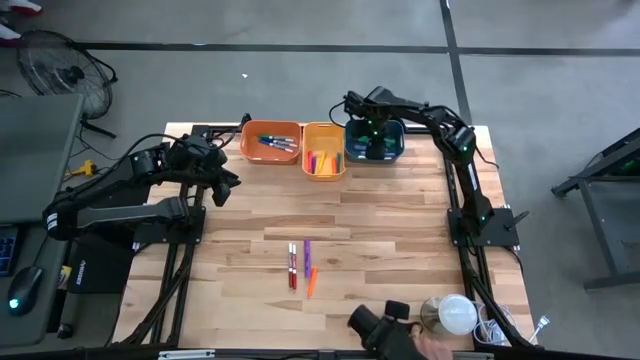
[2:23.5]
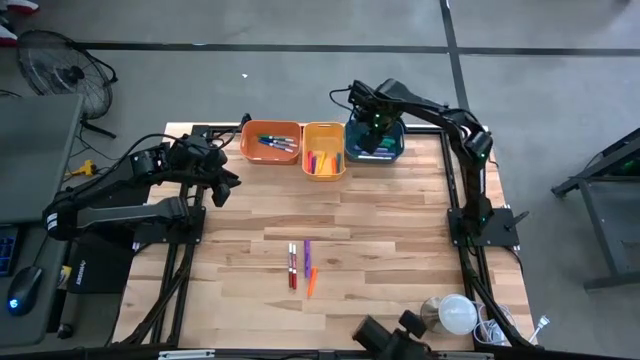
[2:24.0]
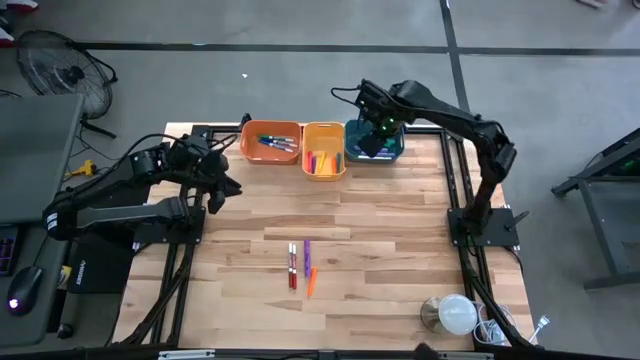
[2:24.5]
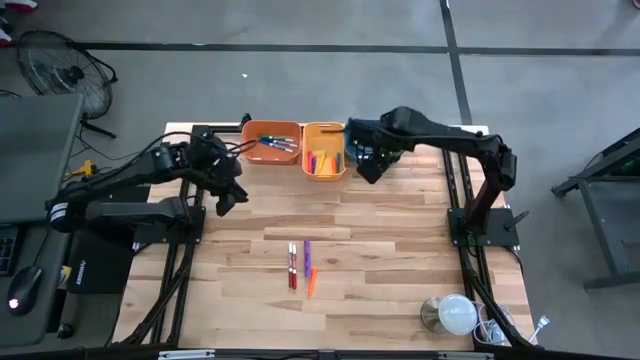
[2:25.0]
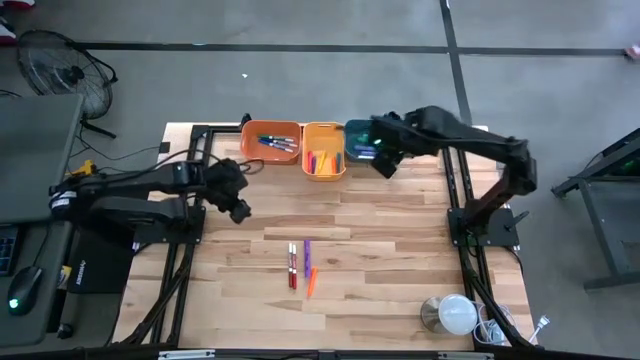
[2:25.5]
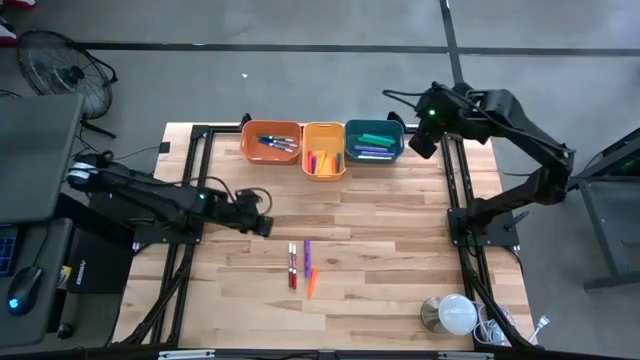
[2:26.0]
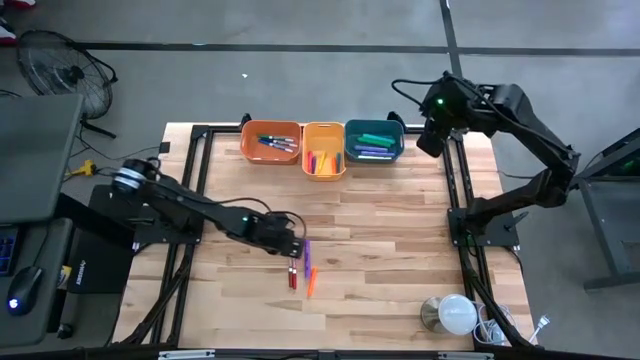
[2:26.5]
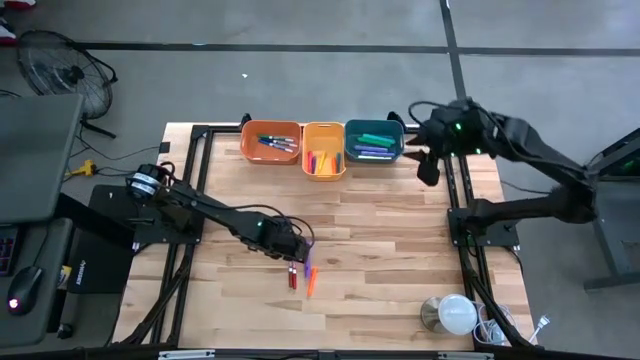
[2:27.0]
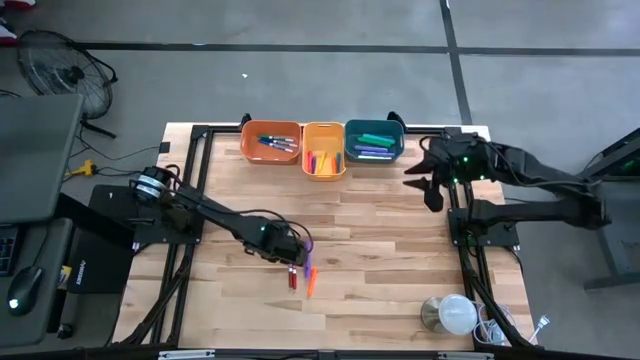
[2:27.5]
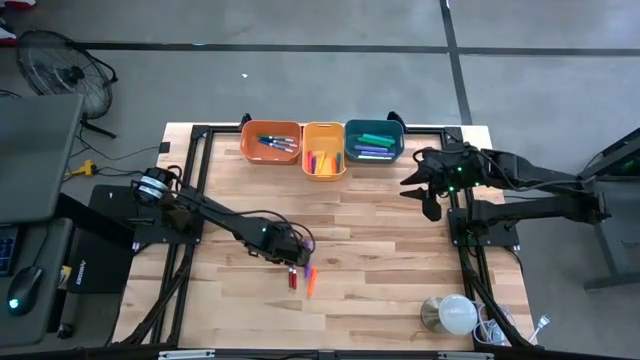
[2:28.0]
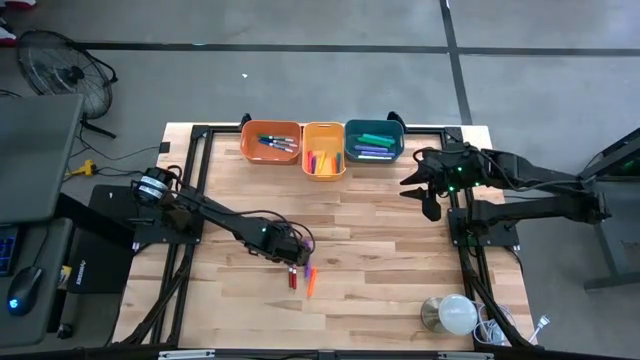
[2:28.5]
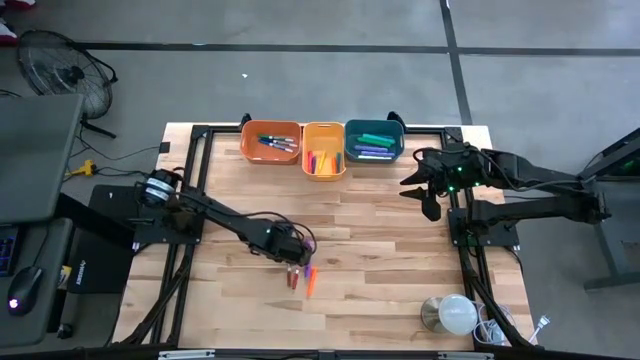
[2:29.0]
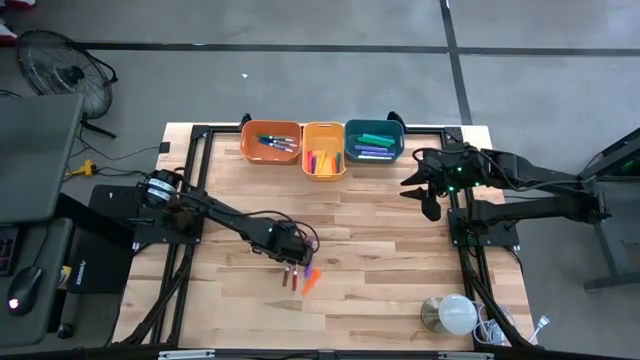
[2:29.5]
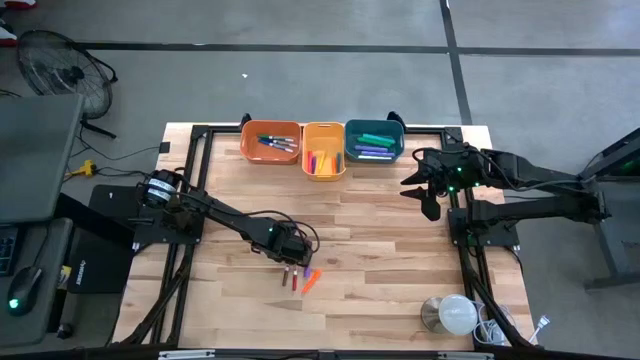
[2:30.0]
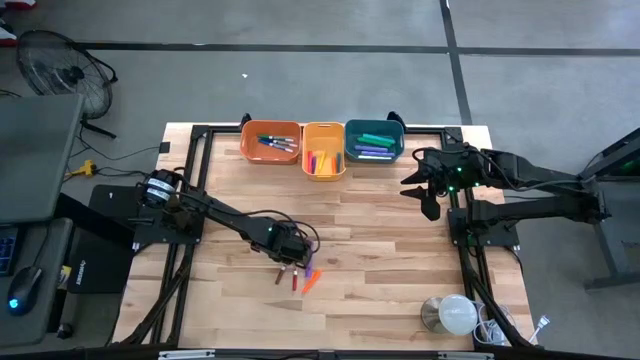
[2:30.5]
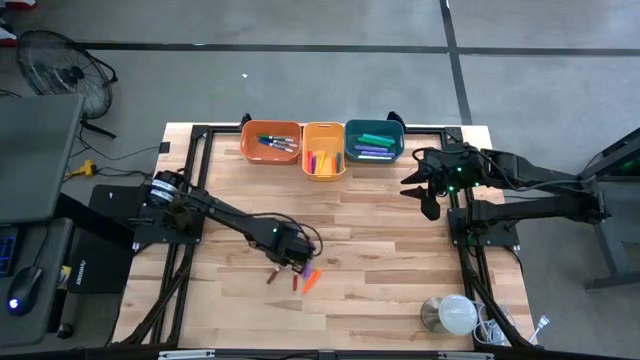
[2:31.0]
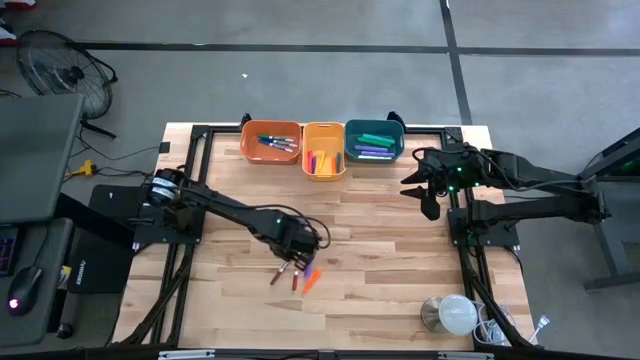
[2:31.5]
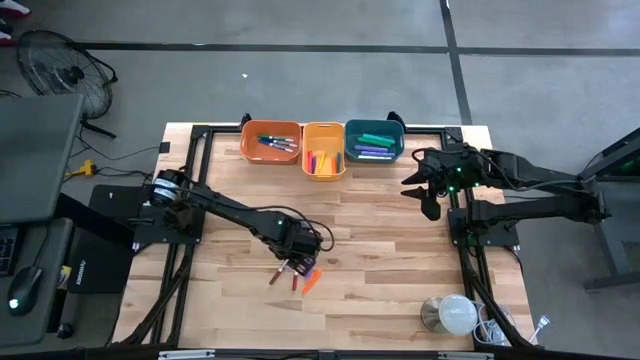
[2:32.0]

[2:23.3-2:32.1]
Task: Pick & Place Markers
Put the brown marker into the orange bin

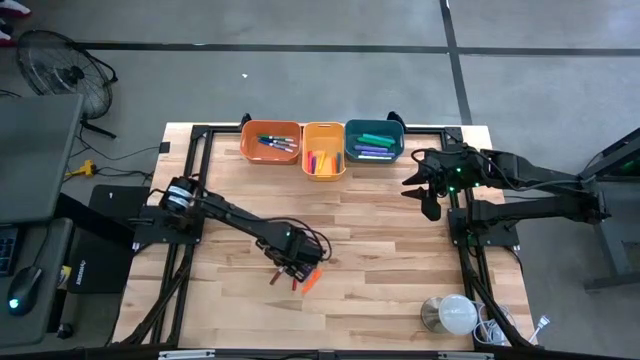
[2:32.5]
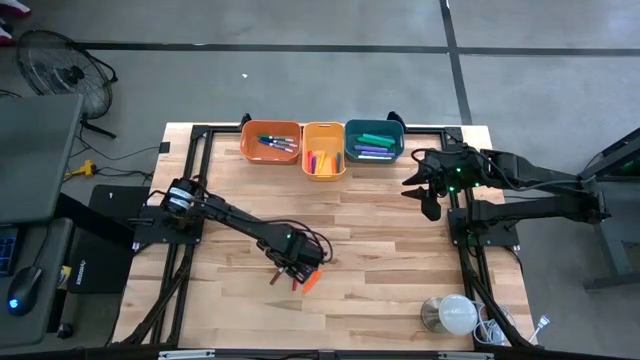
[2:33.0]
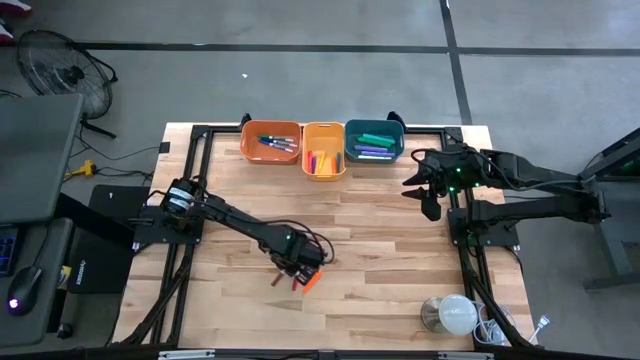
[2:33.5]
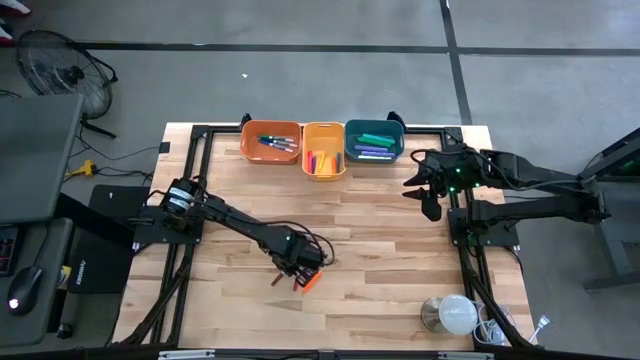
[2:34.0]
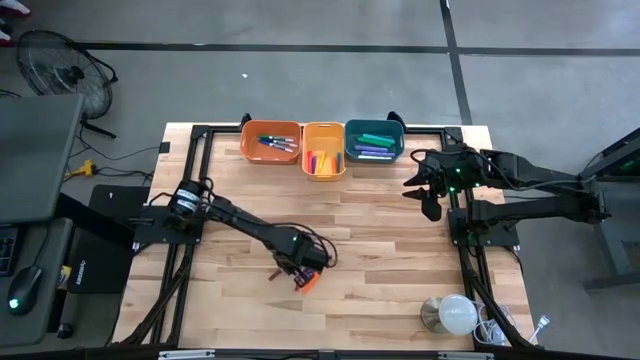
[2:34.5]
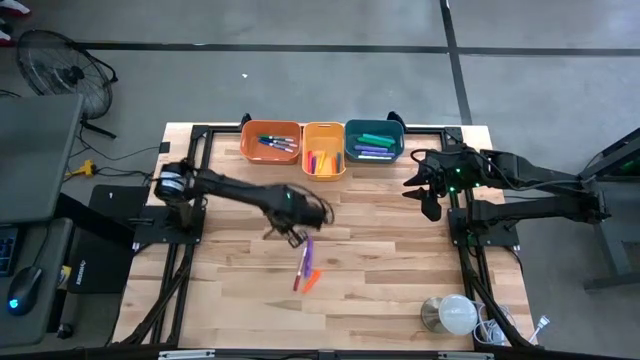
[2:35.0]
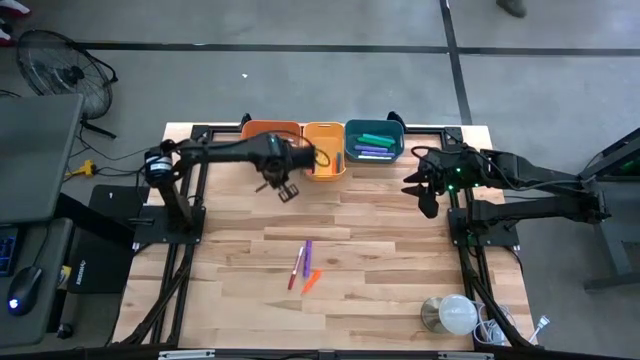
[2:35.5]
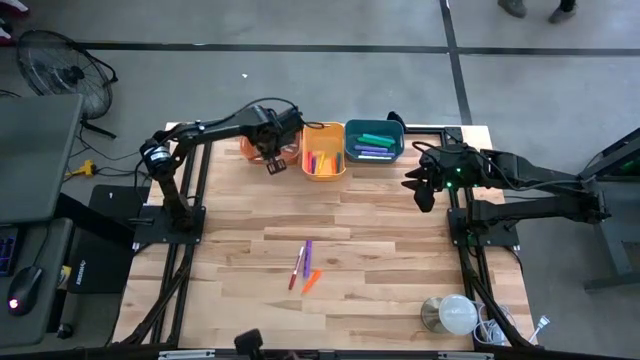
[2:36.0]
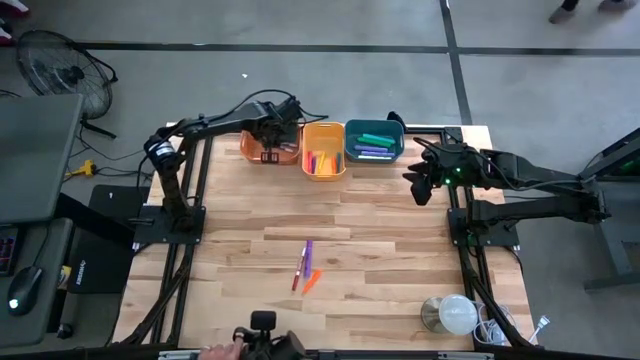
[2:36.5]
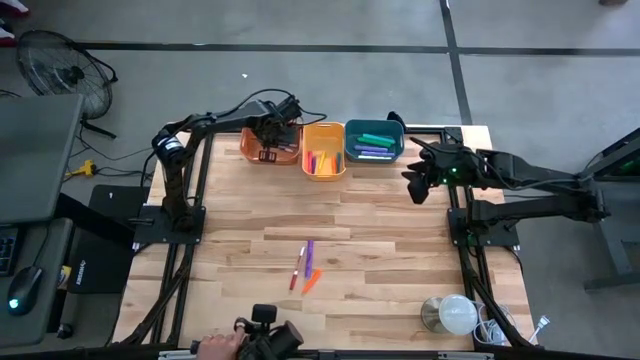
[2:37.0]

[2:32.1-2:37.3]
Put the brown marker into the orange bin

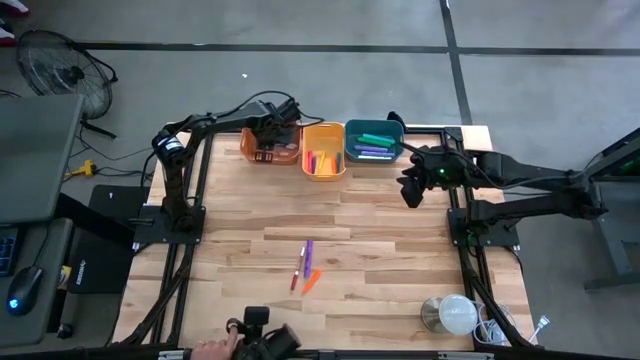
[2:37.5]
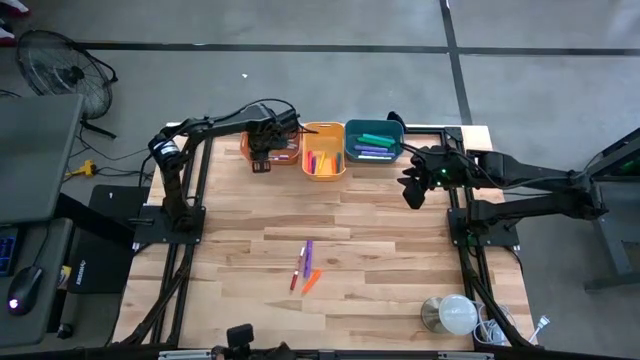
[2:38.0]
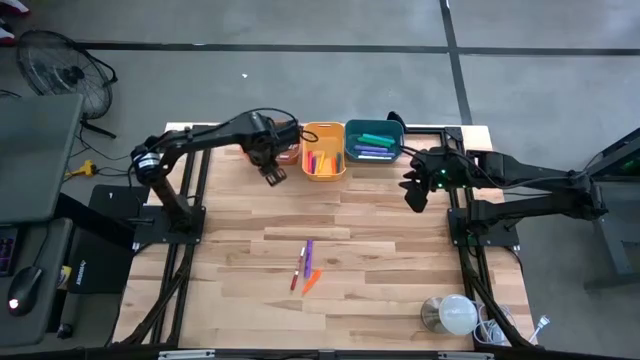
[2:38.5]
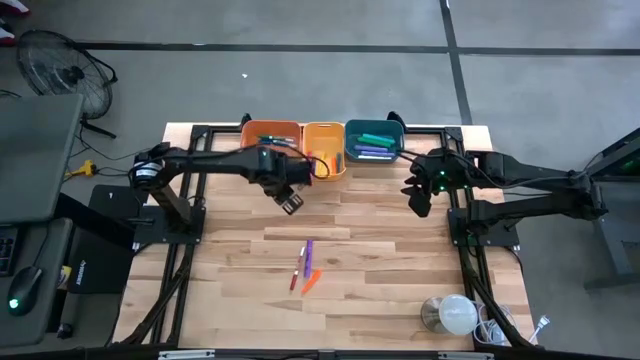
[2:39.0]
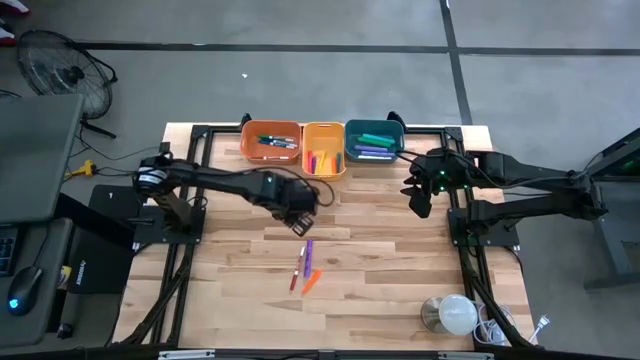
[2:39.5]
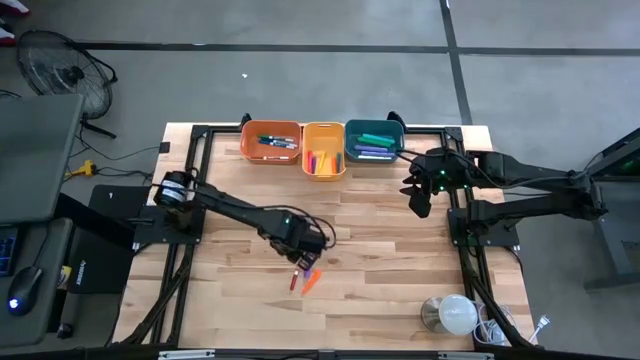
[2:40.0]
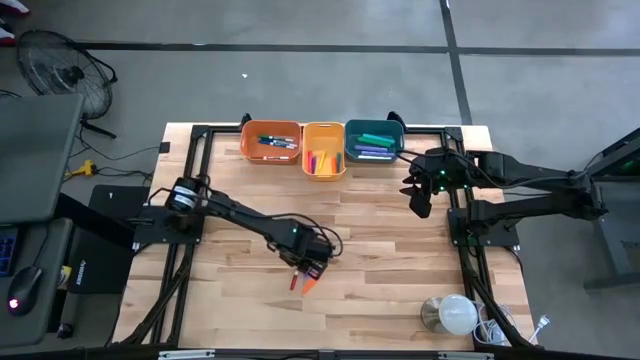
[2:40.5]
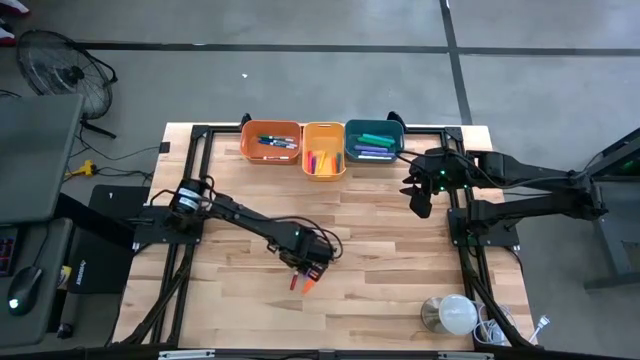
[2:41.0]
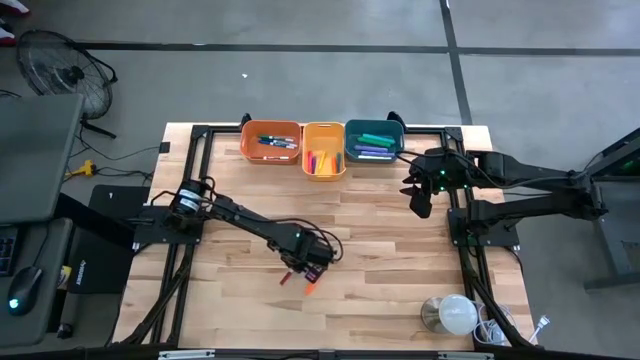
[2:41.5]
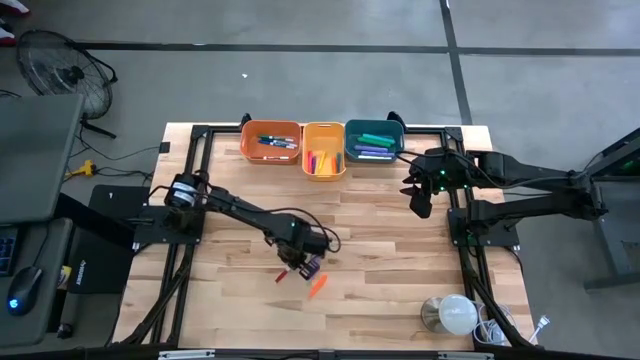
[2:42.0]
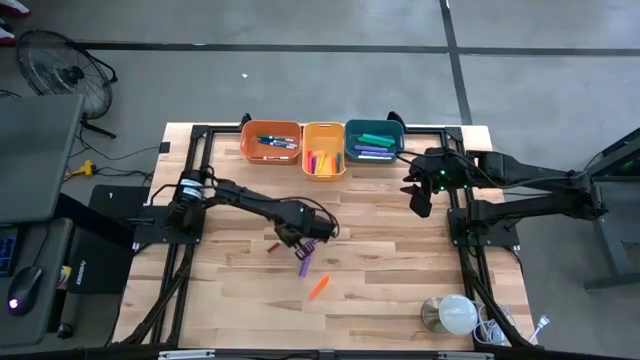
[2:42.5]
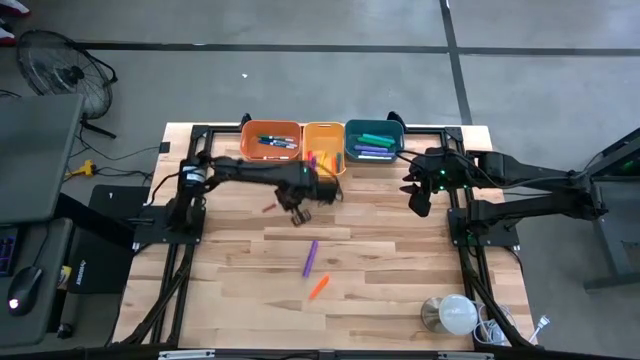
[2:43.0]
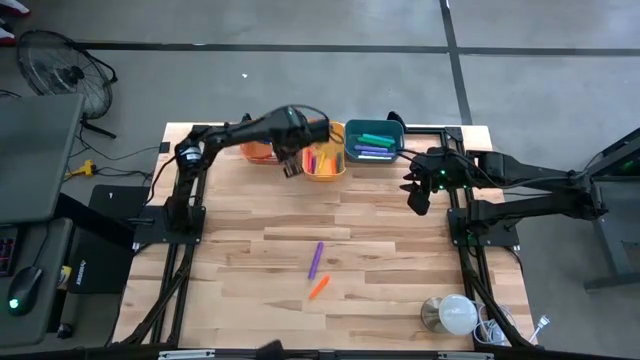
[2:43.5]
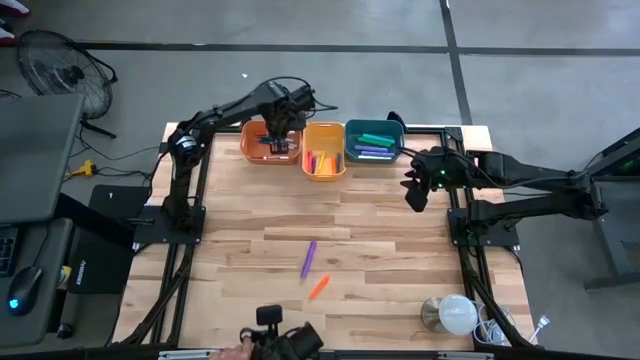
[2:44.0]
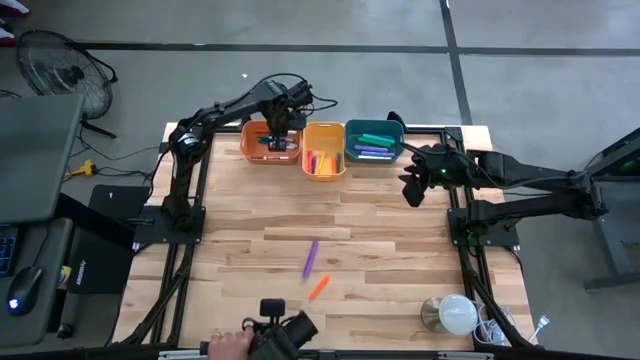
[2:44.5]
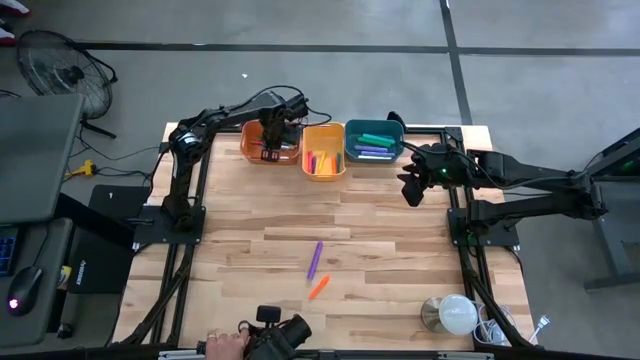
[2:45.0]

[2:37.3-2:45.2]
Put the red marker into the orange bin
